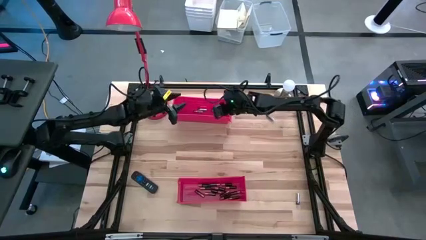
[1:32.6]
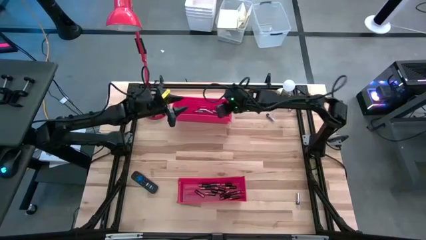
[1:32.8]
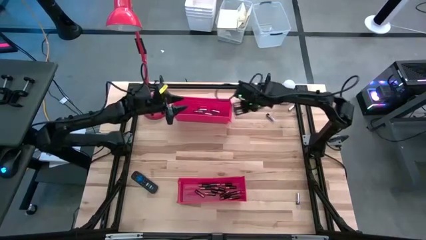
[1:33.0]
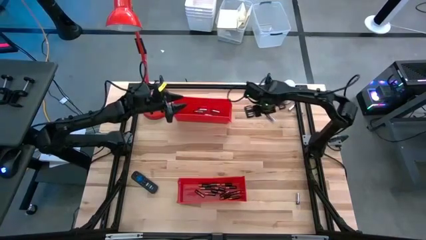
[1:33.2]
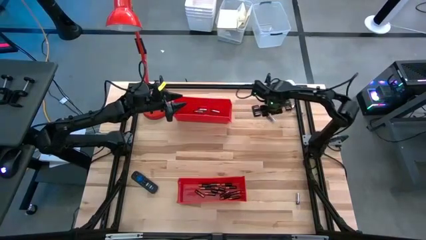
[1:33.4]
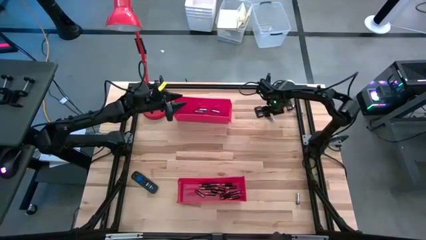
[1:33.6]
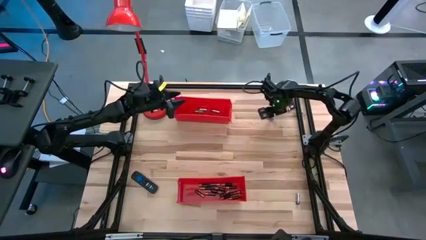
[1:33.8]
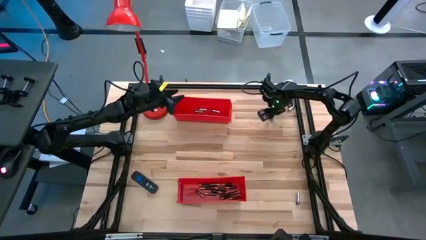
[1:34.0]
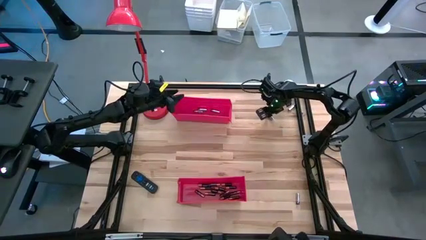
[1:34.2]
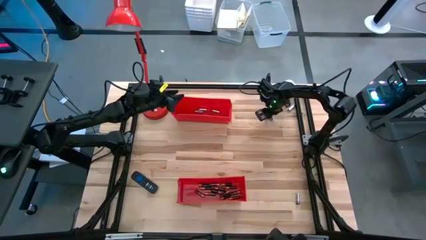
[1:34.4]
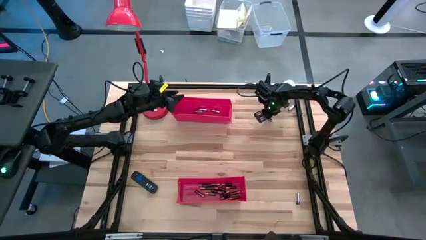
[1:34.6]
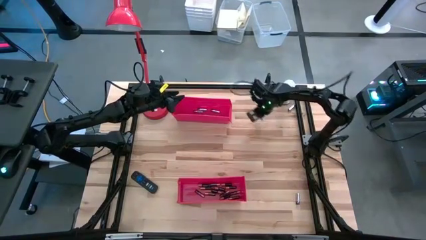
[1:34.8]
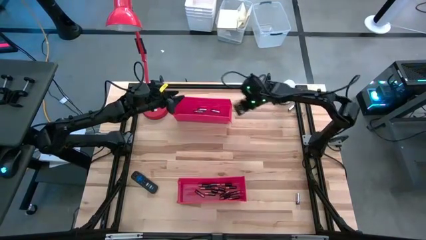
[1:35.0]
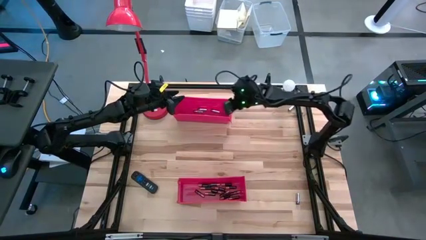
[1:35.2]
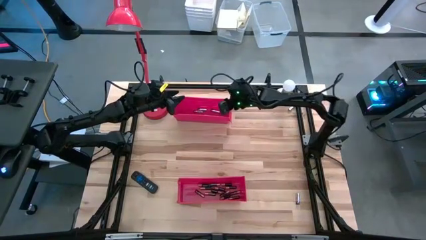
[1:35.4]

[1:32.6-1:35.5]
Task: Sort batteries
Put the top left silver battery into the top red bin

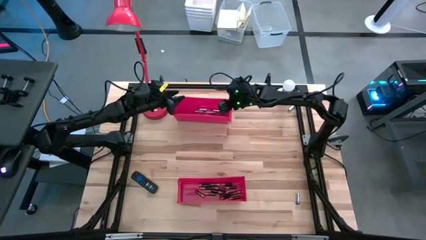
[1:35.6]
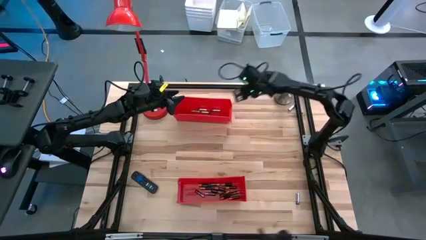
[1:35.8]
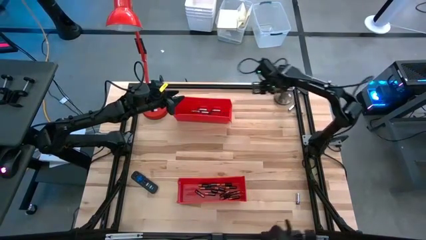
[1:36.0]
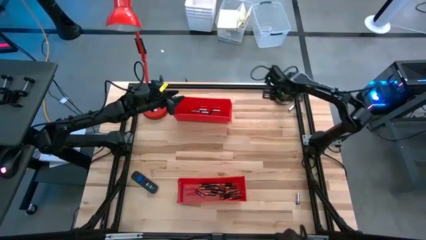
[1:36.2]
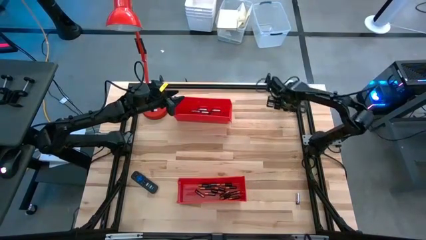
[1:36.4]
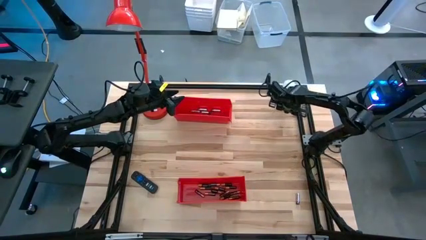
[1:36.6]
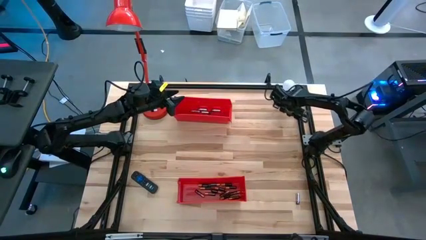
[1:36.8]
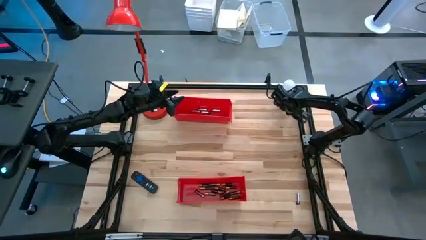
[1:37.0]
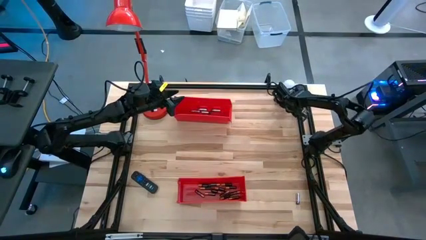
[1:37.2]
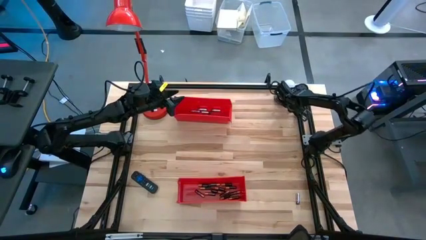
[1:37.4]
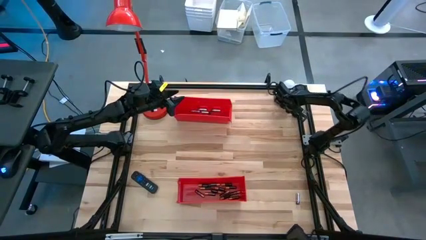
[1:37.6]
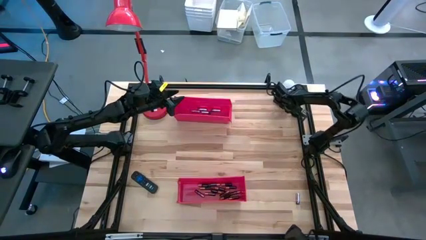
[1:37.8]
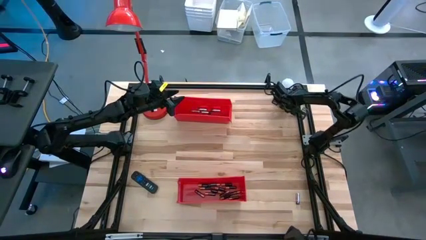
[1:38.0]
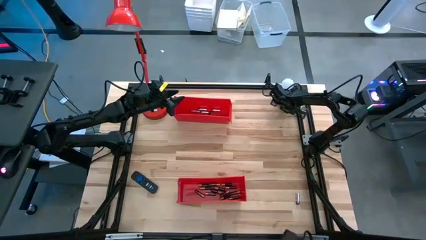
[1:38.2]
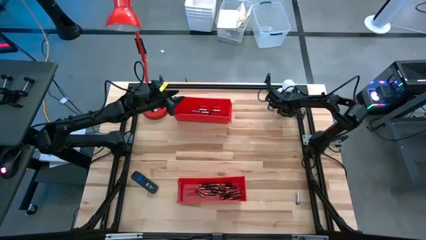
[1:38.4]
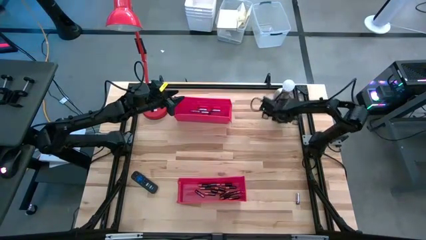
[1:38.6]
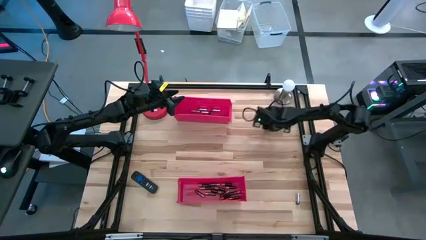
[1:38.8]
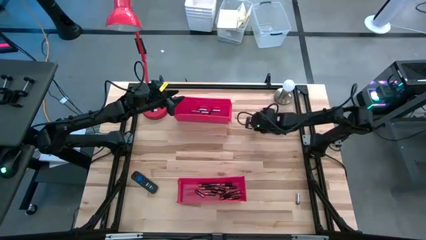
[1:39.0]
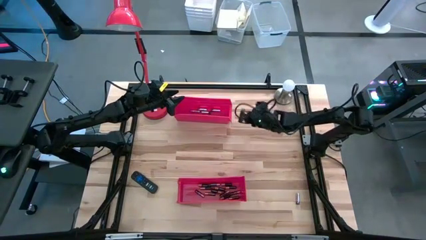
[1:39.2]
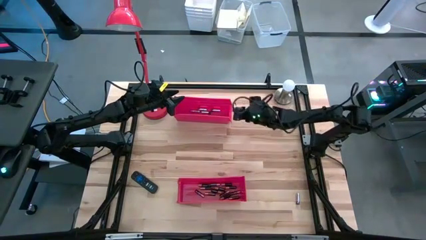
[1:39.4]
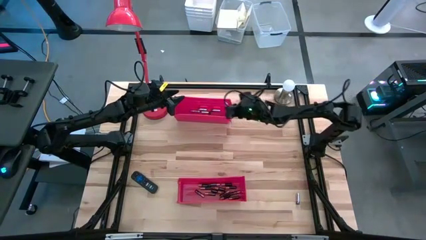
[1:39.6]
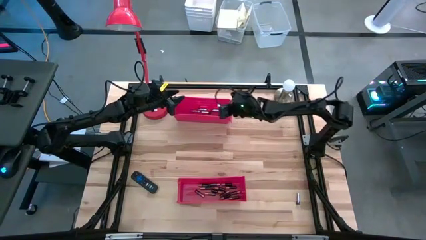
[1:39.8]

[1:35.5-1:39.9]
Put the top silver battery into the top red bin

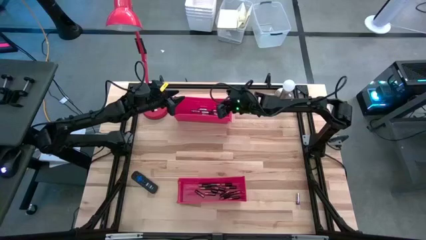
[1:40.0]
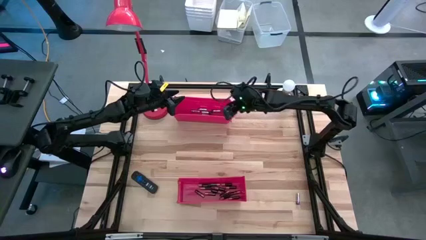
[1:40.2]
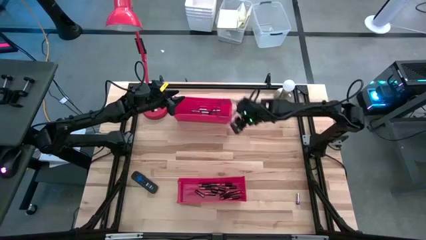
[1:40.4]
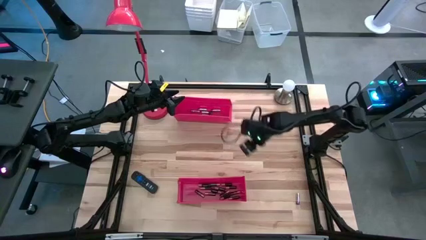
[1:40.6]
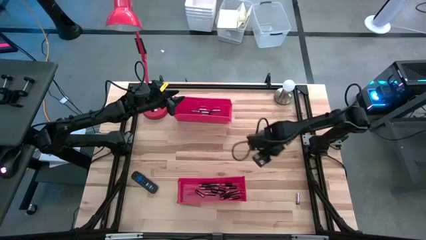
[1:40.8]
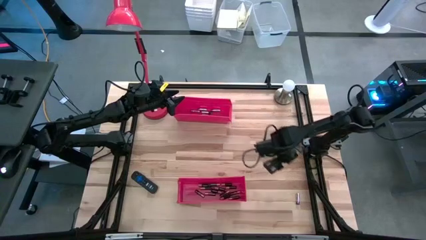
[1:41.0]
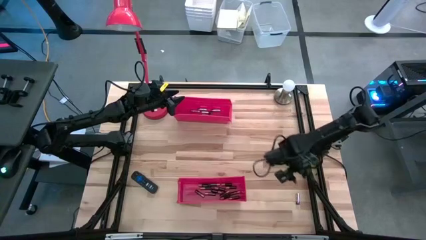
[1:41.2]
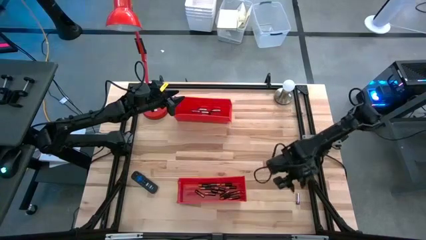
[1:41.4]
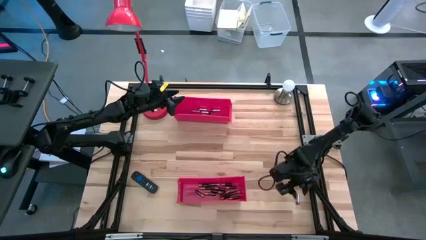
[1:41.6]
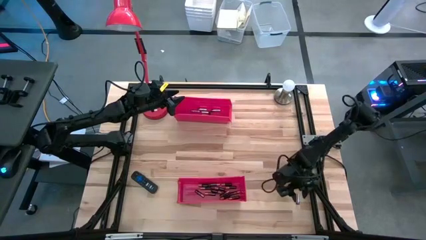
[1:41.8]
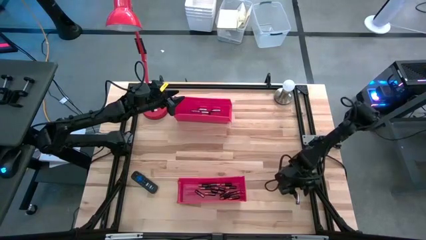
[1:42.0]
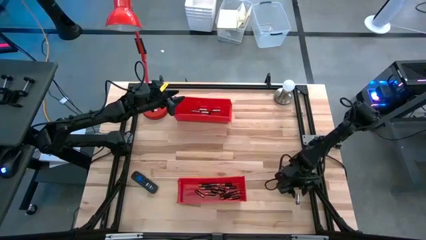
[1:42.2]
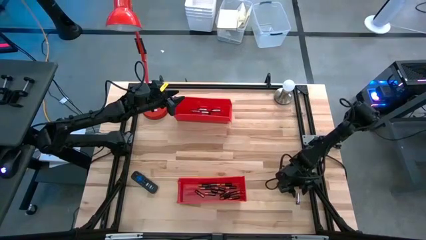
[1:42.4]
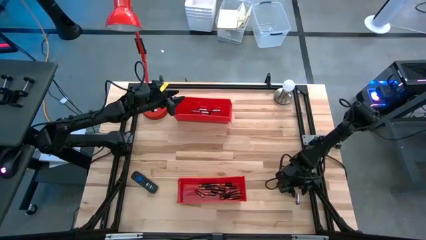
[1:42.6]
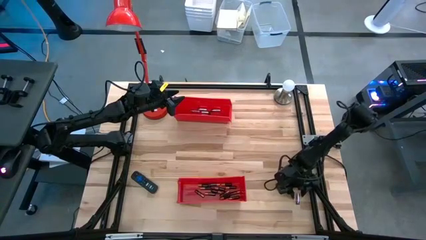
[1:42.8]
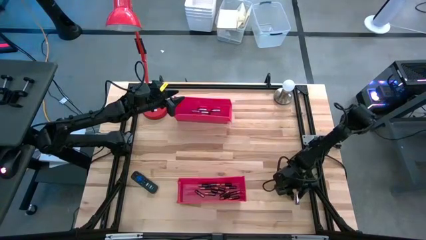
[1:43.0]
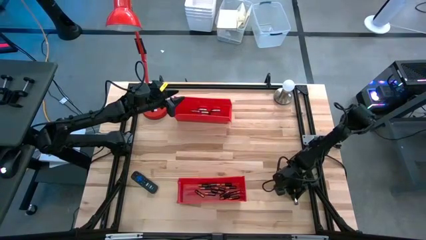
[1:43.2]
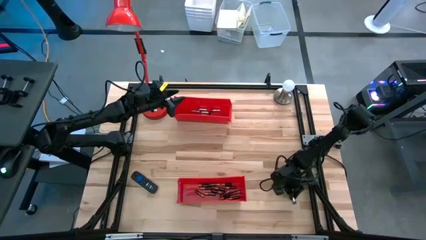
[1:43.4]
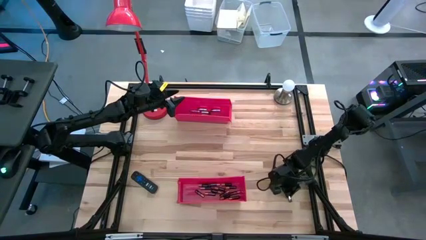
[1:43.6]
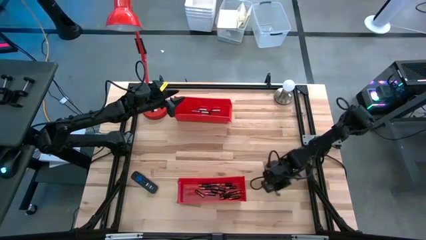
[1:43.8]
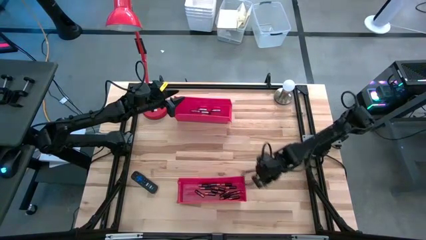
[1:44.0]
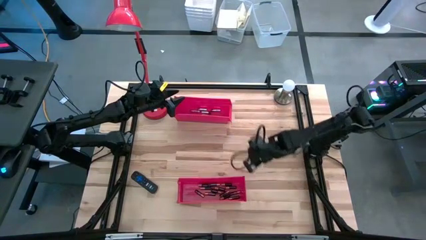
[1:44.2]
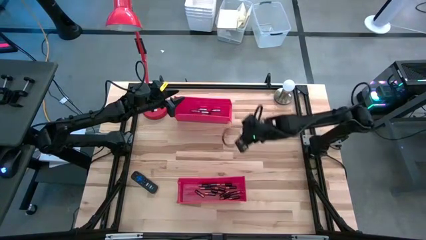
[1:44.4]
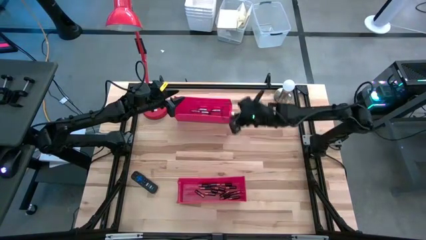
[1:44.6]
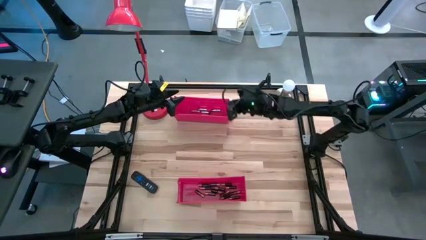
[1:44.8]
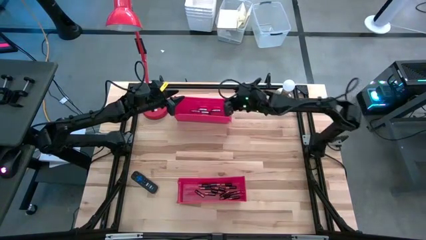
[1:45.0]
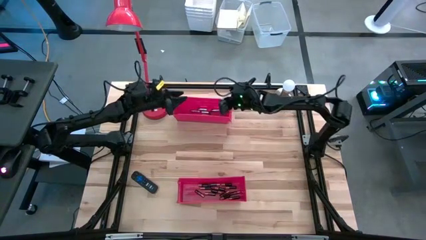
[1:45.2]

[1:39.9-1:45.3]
Put the silver battery into the top red bin

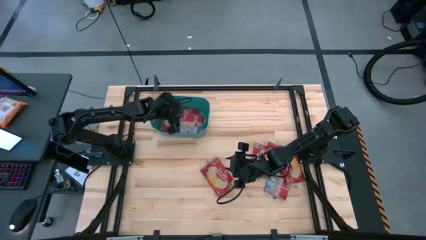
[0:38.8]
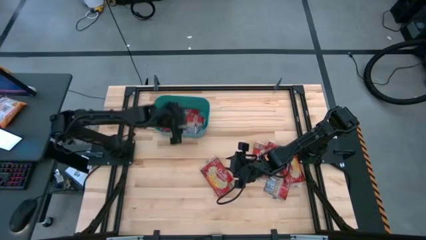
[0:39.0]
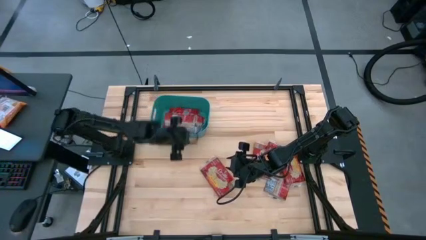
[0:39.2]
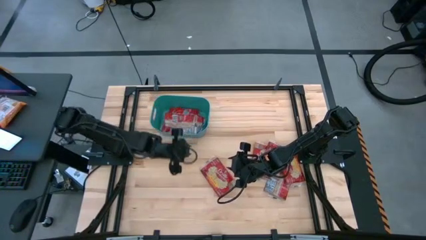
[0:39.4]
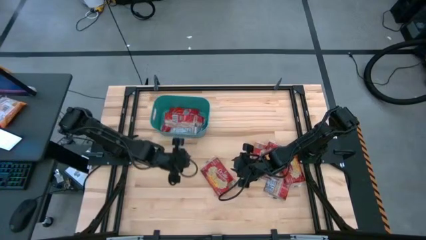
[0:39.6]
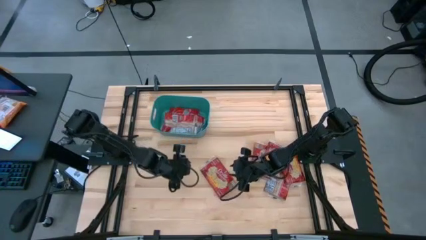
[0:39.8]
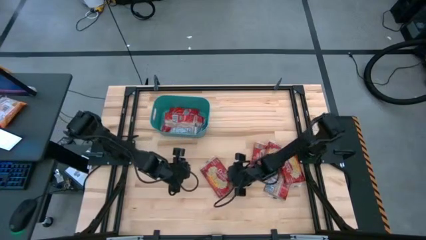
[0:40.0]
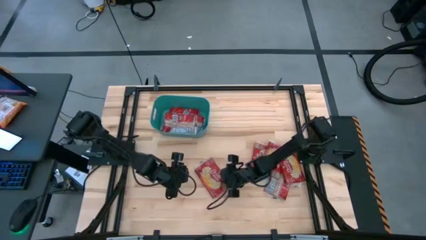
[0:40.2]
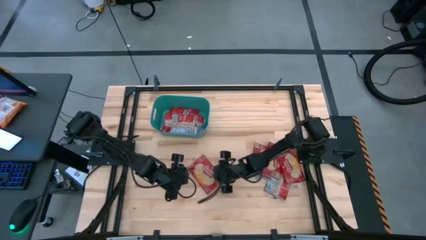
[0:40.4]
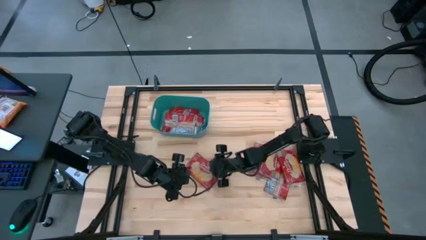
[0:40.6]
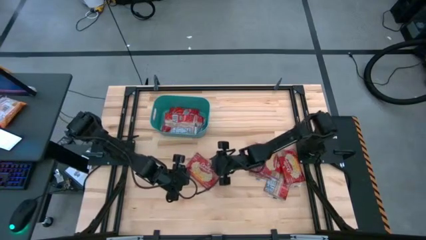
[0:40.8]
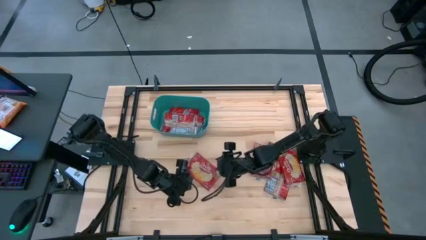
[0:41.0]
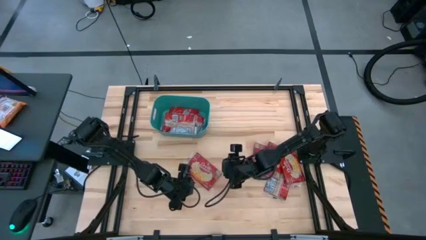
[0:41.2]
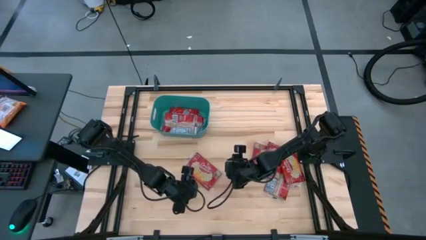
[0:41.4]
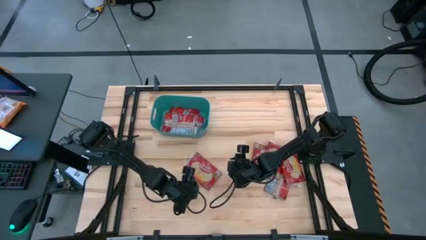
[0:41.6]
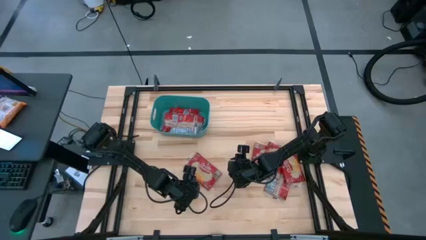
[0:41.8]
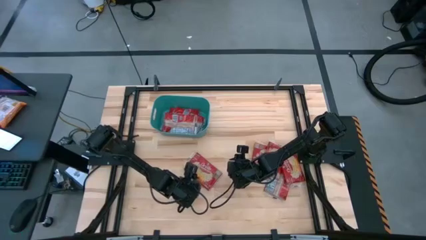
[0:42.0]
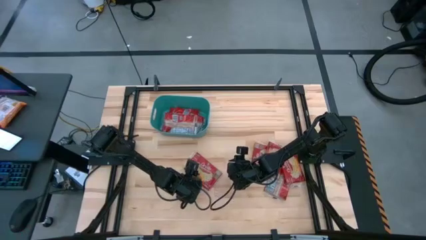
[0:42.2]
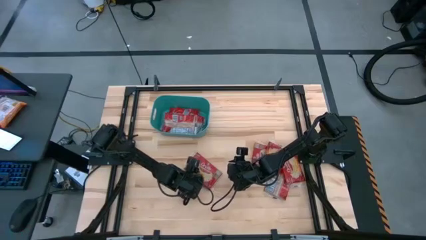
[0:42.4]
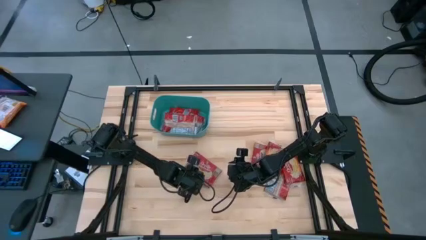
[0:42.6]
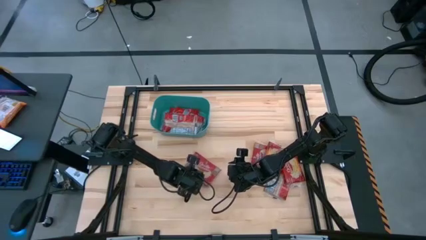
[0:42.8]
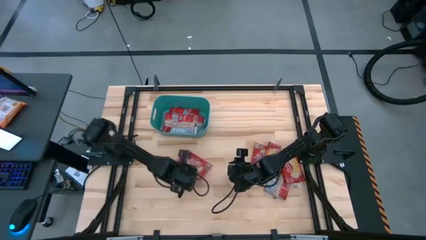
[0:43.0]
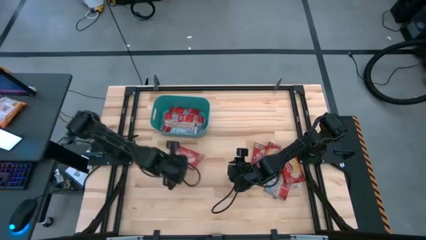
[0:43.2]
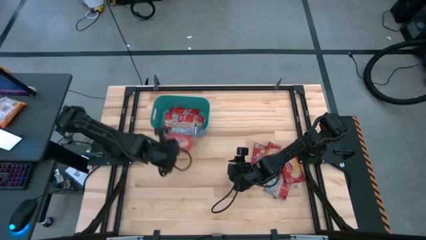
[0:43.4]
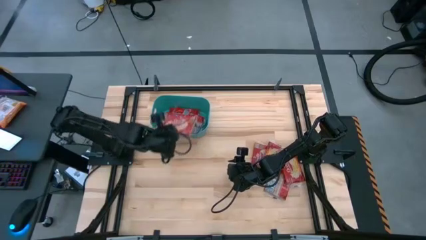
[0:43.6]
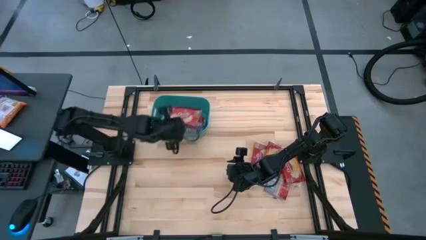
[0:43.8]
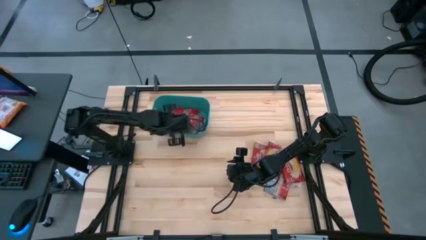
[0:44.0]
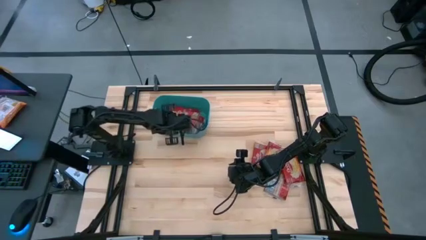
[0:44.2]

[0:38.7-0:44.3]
Task: Sort popcorn bags into baskets
Put the red popcorn pack into the green bin
